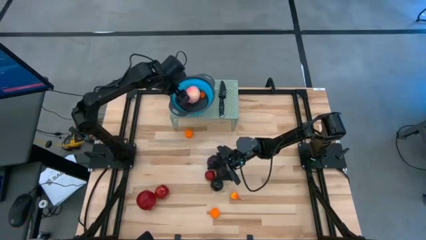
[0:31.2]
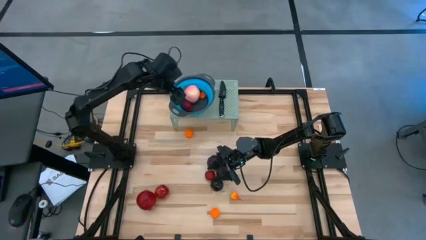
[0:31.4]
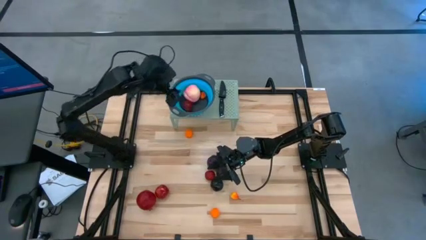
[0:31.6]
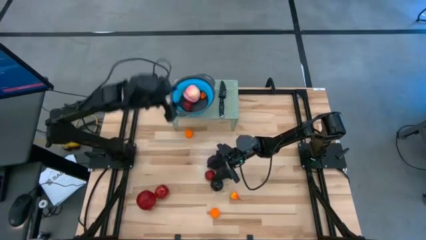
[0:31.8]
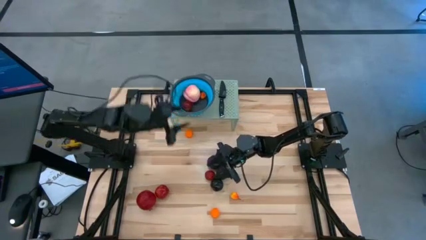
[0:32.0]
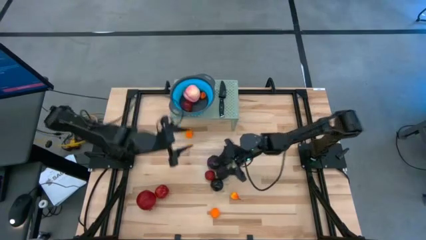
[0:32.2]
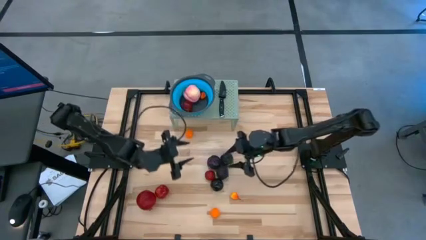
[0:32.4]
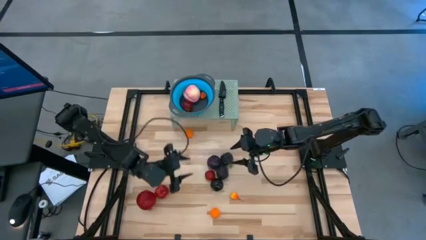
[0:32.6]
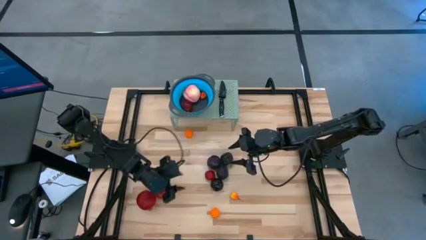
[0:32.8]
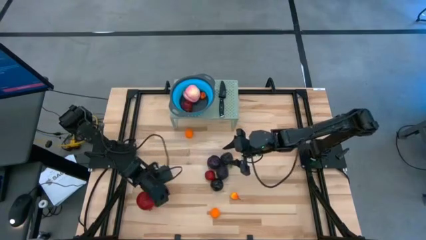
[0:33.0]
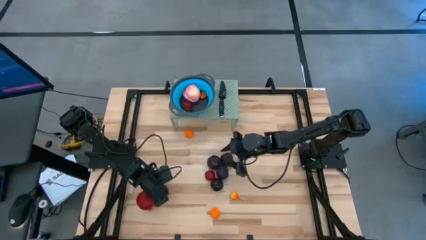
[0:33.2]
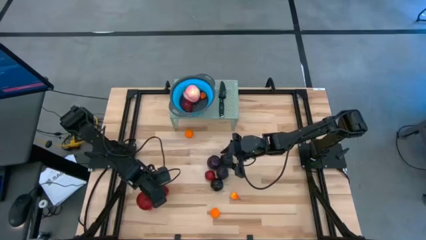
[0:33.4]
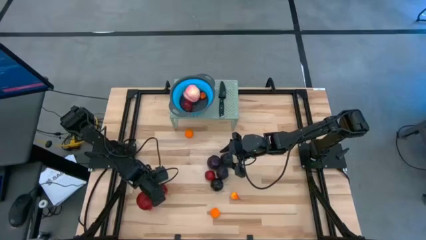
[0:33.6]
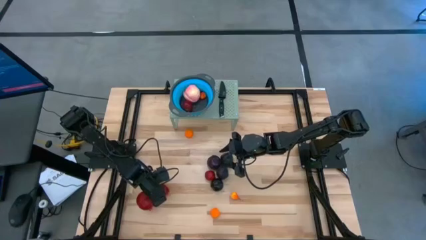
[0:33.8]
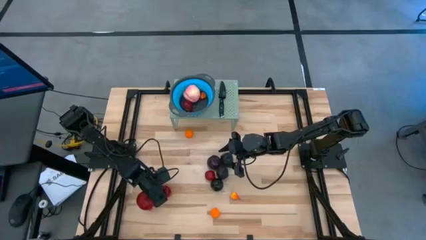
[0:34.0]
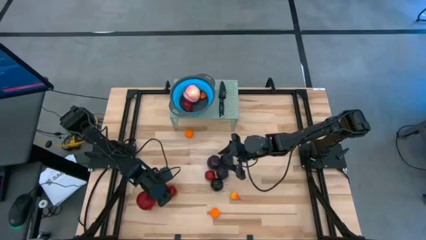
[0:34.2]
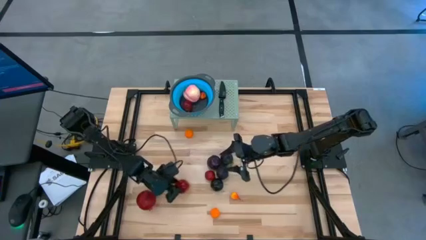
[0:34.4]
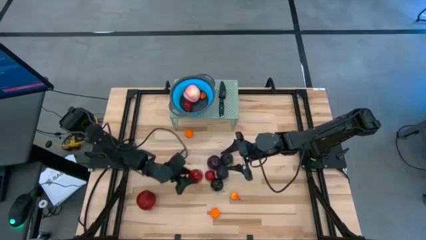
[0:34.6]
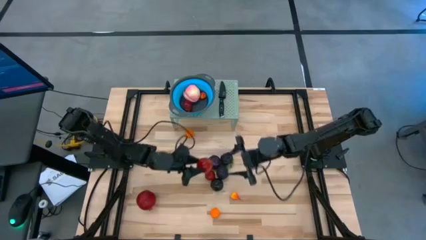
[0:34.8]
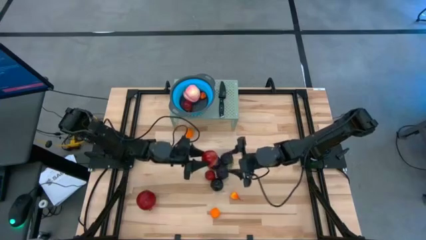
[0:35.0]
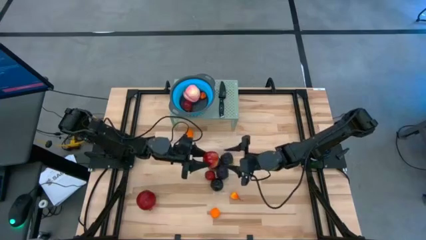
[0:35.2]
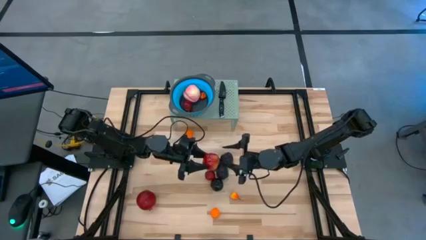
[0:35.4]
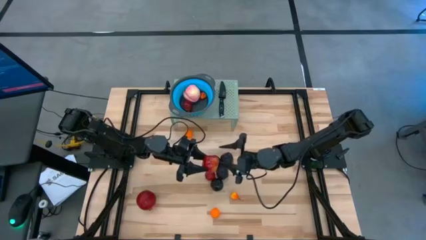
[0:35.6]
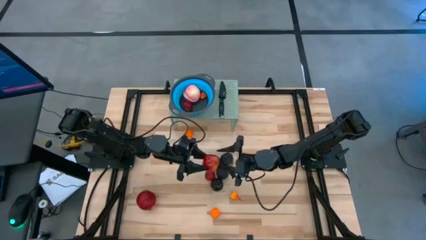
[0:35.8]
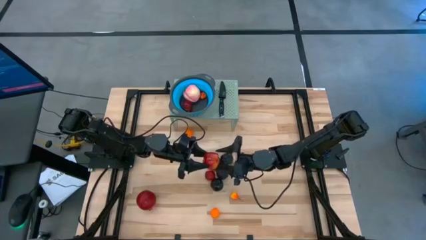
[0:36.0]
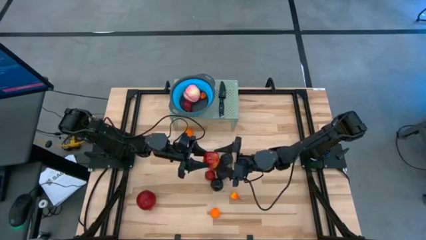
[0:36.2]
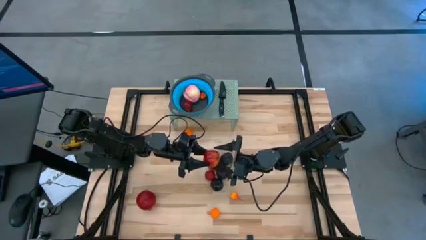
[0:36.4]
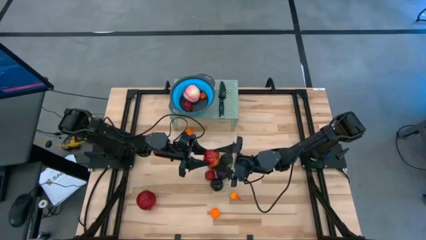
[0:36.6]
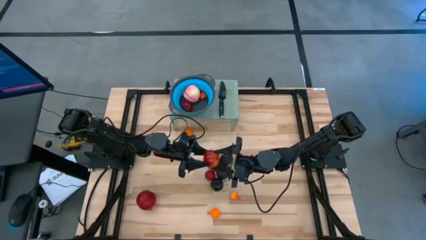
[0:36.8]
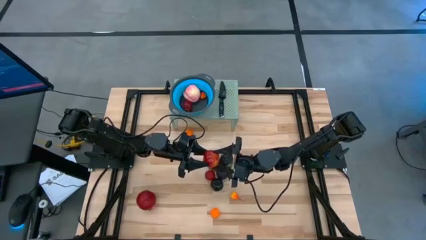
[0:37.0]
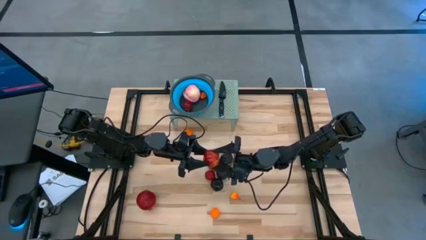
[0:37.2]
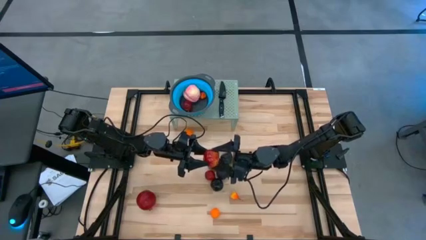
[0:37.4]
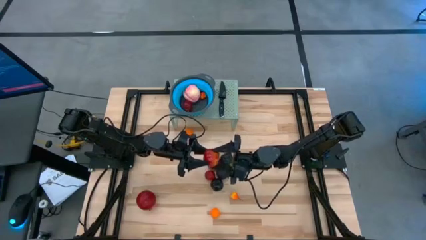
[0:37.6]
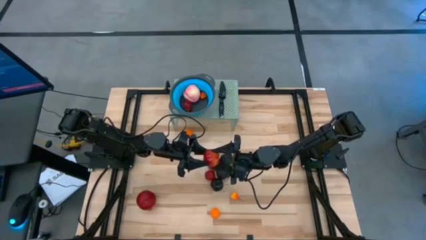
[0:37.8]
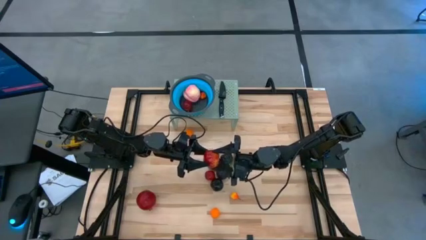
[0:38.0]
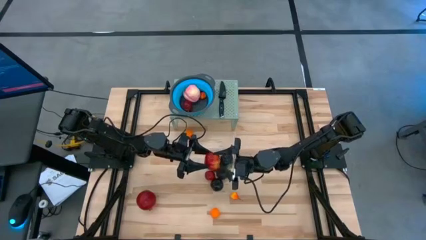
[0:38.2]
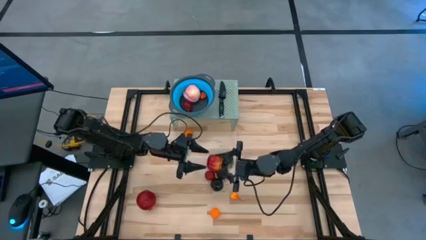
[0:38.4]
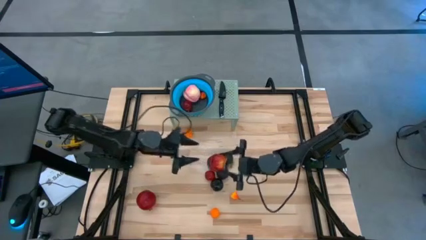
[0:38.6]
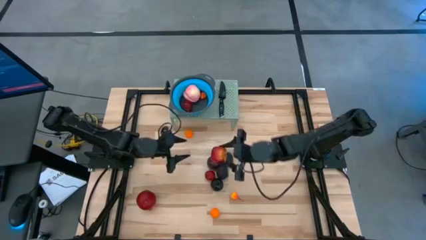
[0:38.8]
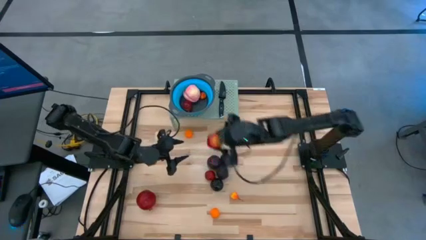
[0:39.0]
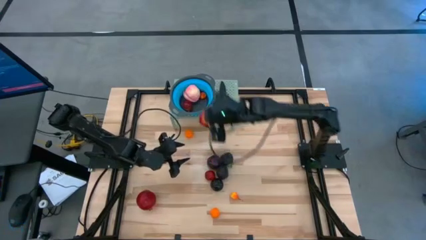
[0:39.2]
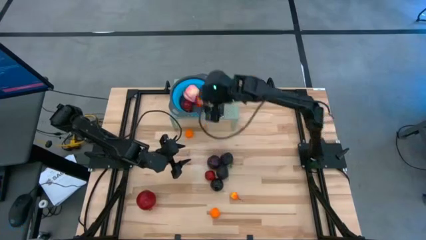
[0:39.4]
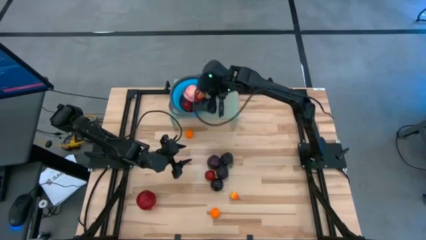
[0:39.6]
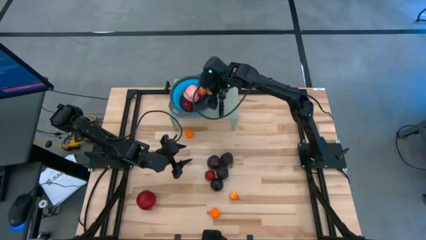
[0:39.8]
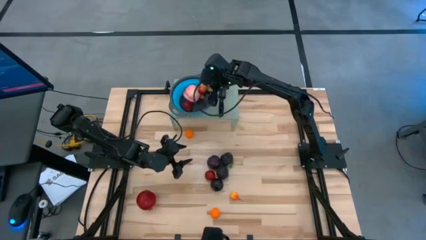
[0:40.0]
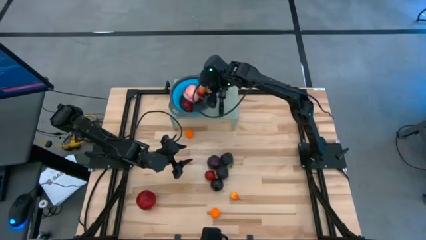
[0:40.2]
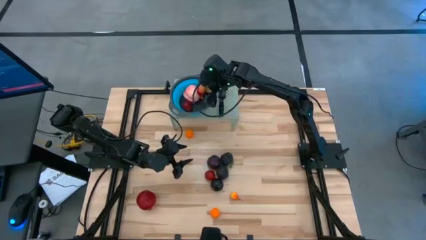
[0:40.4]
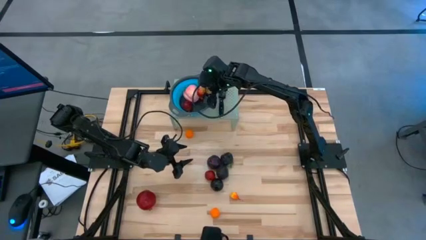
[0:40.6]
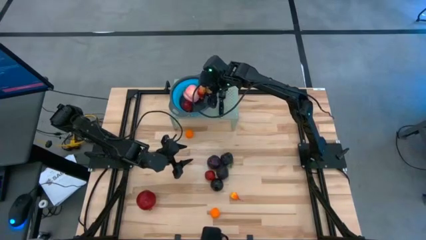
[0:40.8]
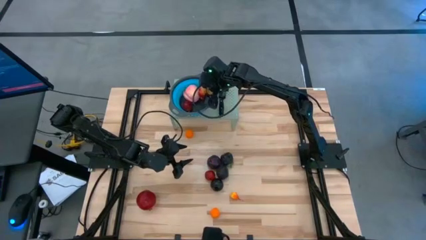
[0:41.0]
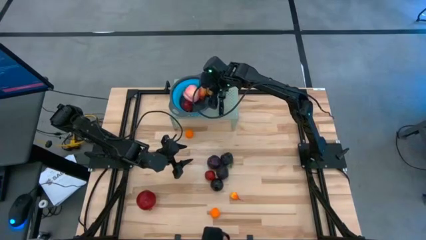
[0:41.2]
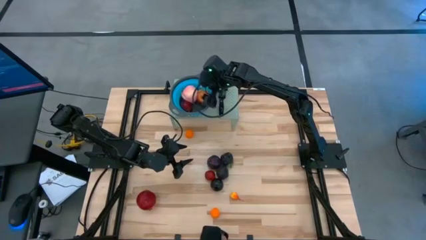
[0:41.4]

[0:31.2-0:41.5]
Task: Pick & Place Fruit
Put the red apple into the blue strainer bowl

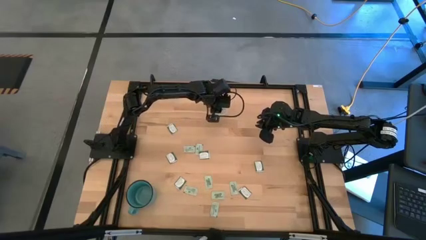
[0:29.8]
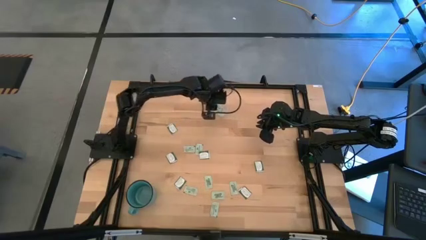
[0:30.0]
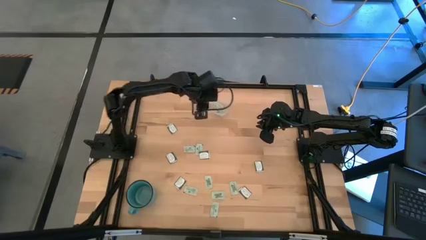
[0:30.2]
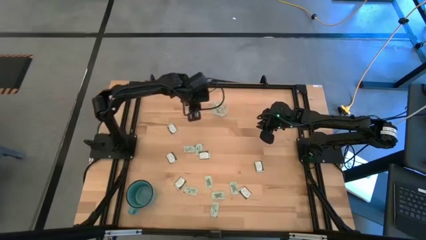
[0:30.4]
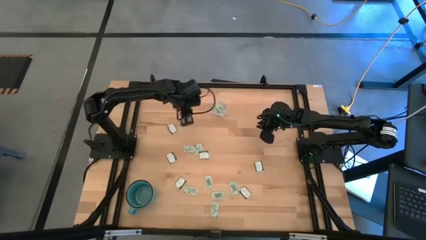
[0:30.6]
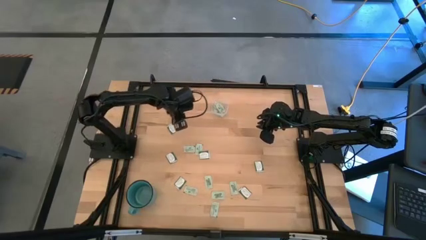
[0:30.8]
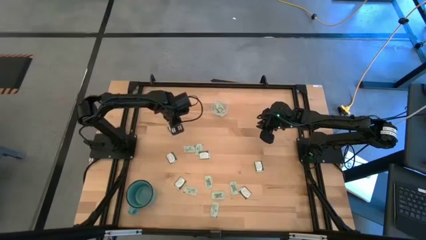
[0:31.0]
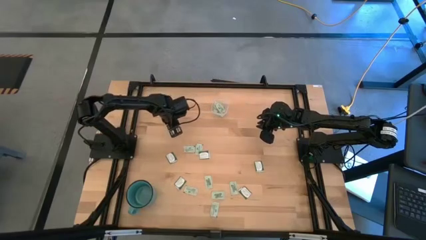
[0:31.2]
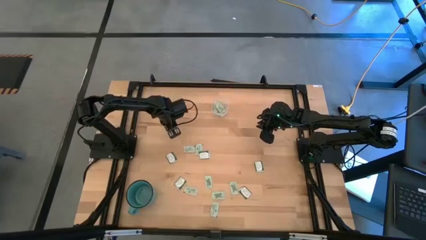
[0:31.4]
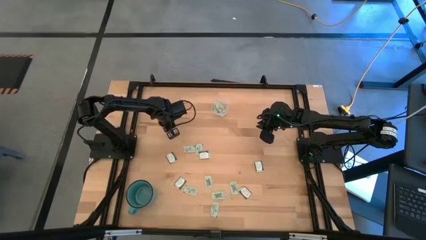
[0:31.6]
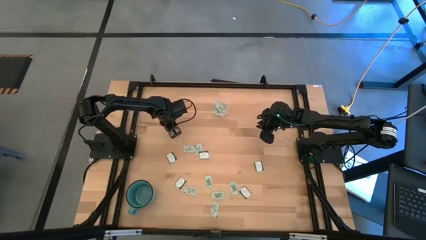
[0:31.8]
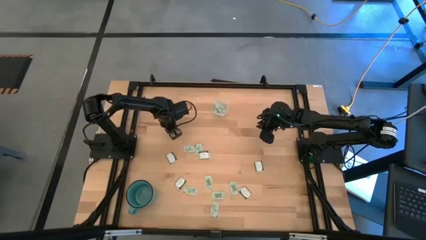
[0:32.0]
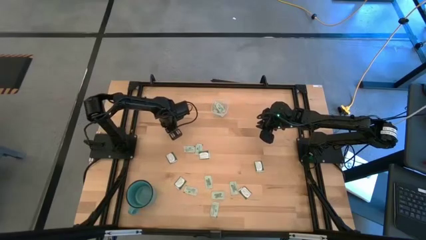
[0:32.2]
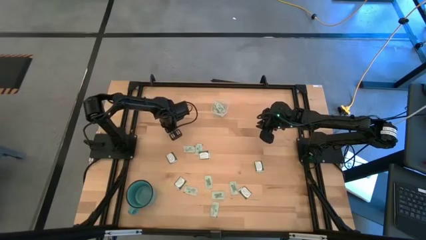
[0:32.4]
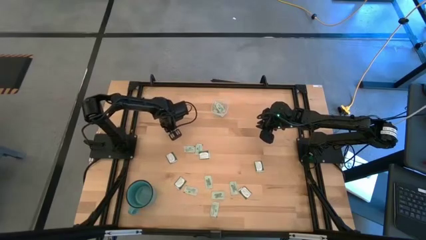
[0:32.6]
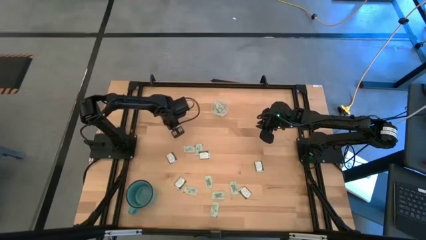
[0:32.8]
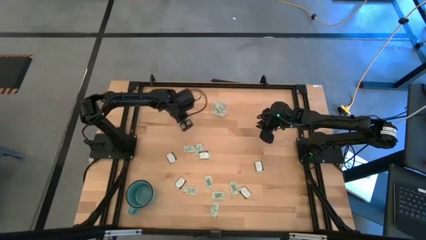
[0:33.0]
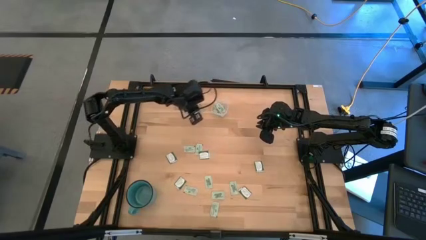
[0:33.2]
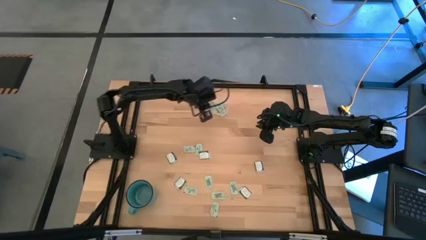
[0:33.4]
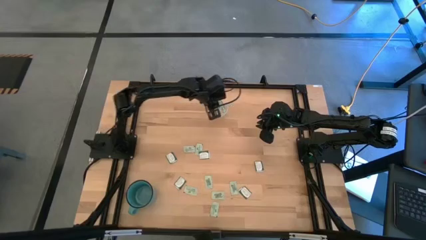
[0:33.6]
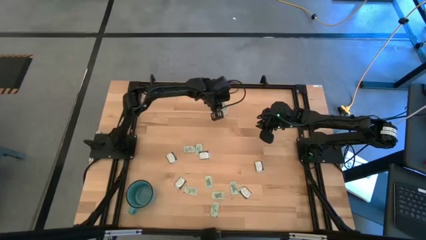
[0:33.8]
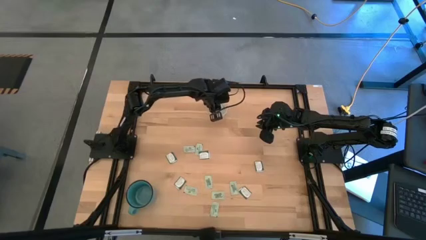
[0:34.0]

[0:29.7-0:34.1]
Task: Pick and place items into bin
Put the green stevia packet into the transparent bin

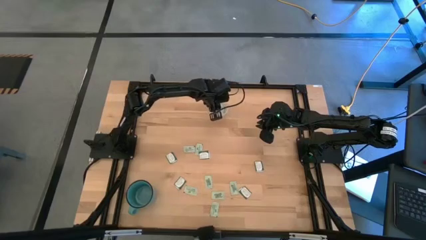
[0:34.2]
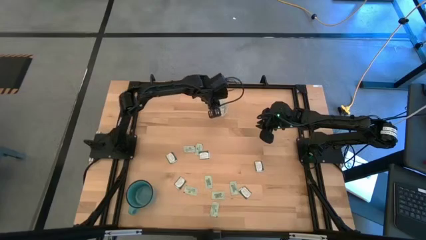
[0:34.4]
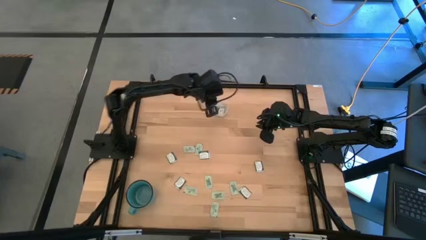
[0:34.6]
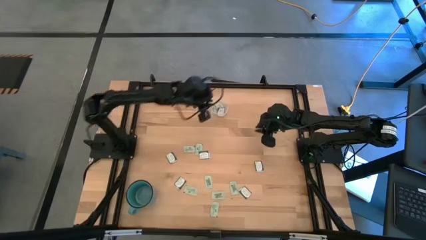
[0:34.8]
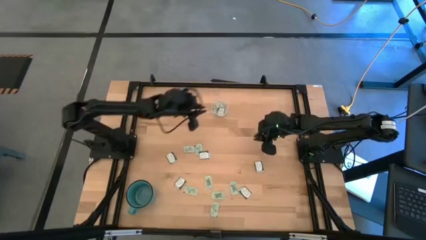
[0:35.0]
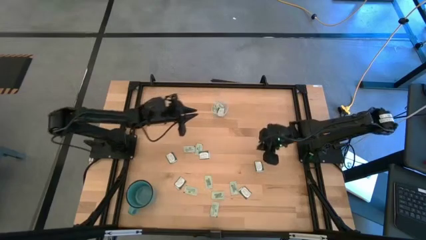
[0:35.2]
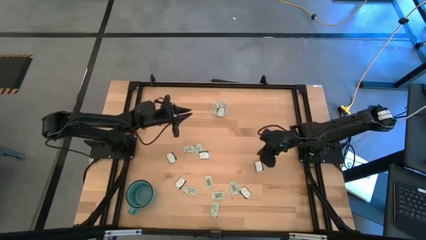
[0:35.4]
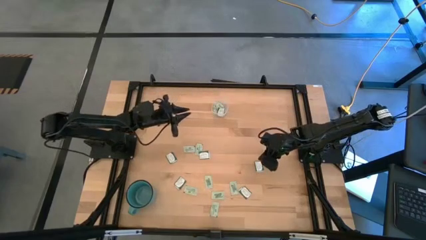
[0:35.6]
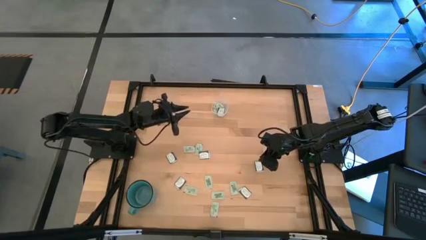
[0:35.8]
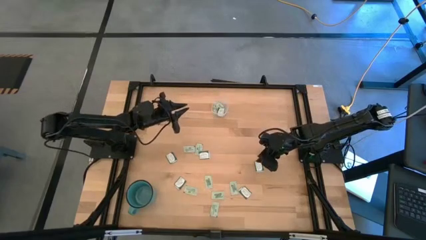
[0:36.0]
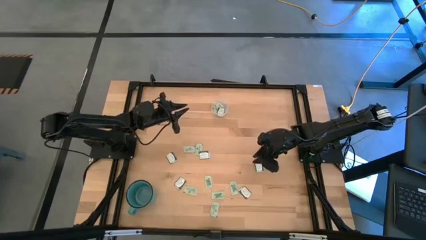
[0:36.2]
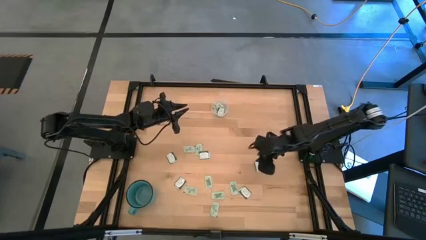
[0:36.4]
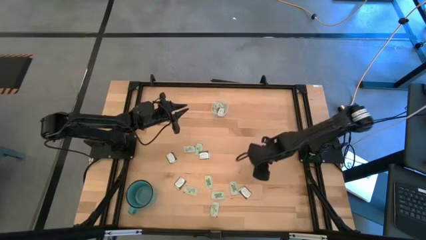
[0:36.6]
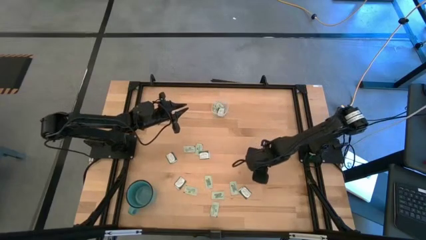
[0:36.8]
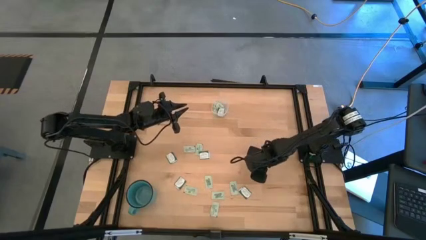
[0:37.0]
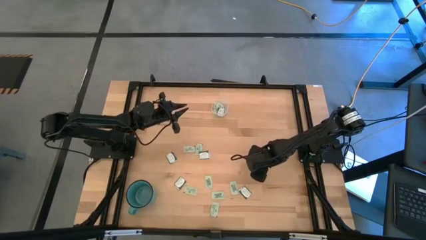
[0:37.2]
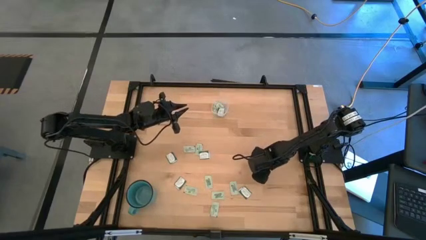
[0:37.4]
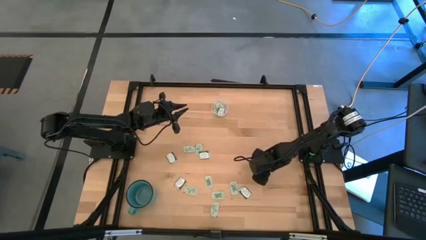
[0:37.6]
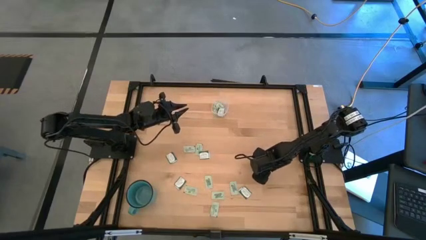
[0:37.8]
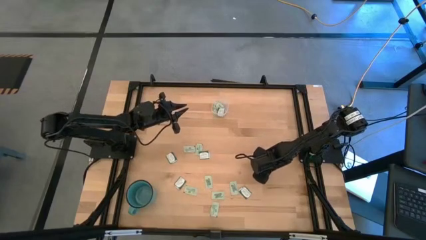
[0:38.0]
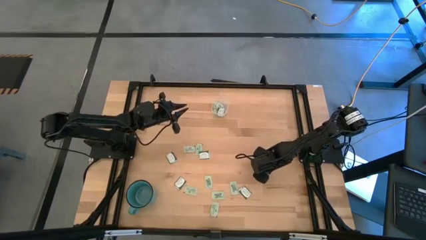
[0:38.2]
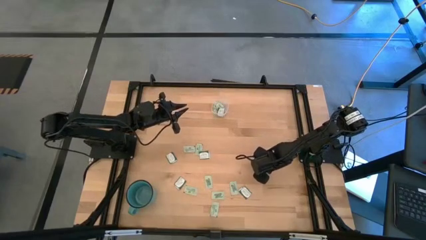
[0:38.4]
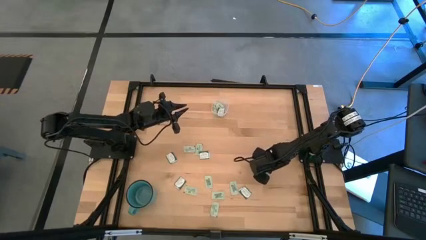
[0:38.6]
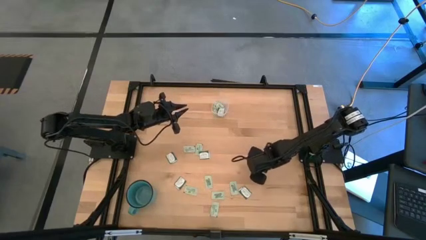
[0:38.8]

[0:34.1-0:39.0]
Put the green stevia packet into the transparent bin
